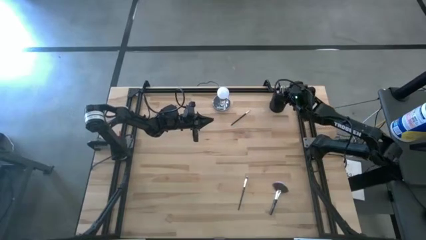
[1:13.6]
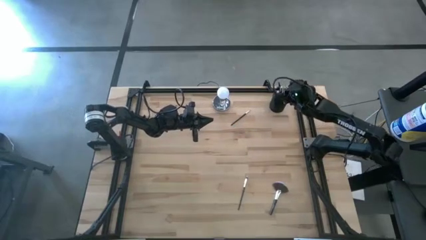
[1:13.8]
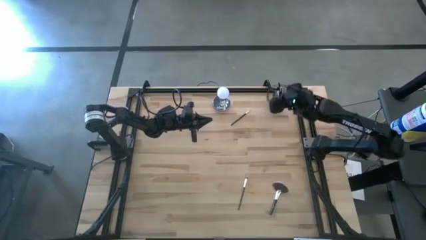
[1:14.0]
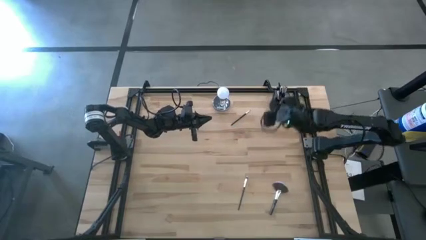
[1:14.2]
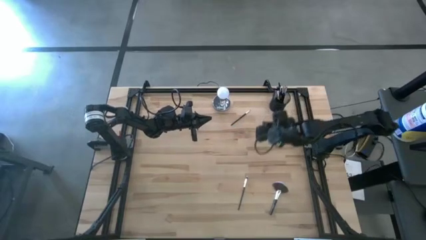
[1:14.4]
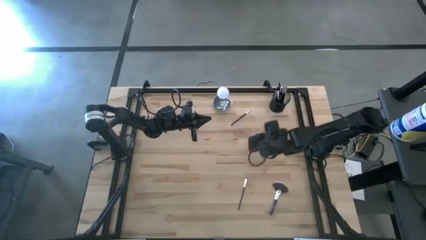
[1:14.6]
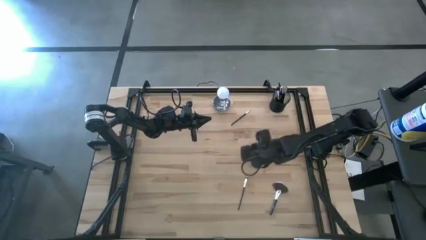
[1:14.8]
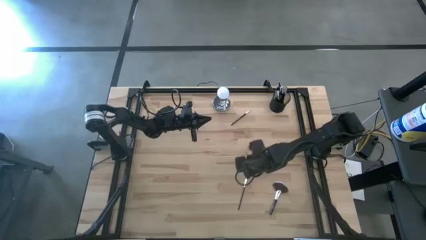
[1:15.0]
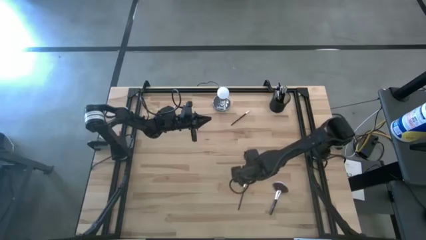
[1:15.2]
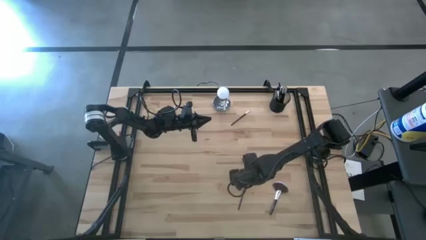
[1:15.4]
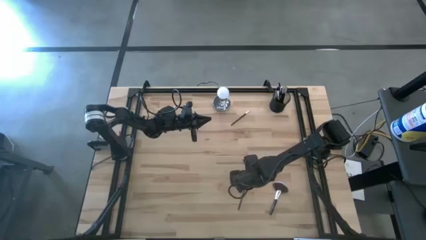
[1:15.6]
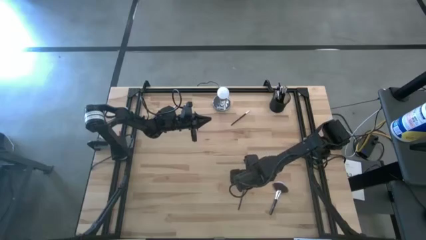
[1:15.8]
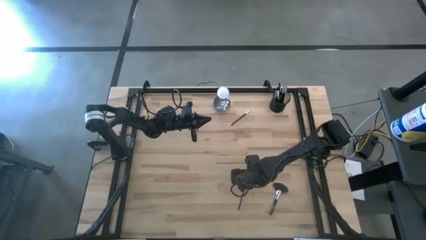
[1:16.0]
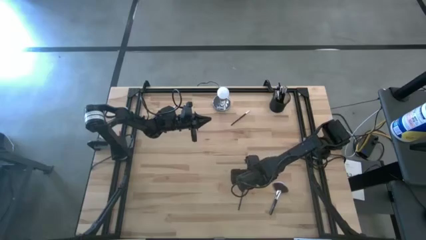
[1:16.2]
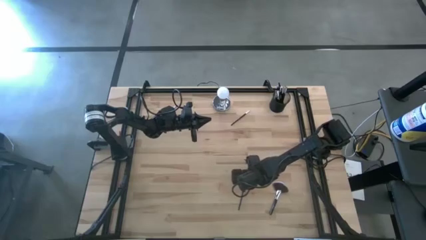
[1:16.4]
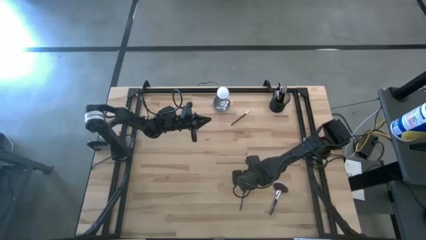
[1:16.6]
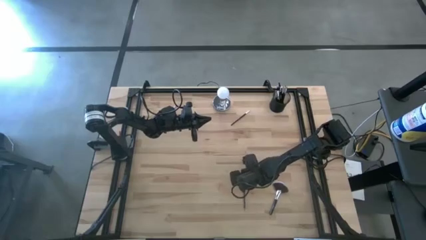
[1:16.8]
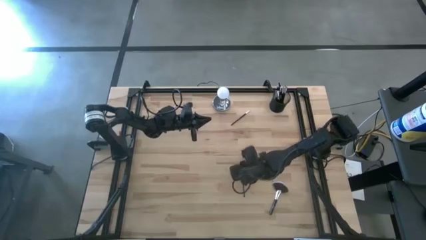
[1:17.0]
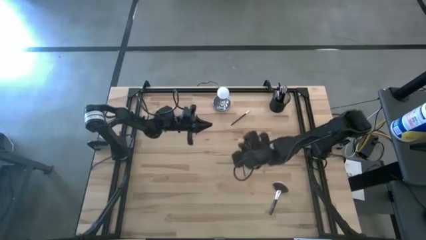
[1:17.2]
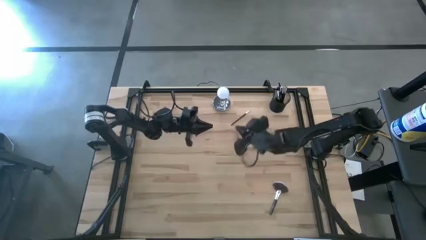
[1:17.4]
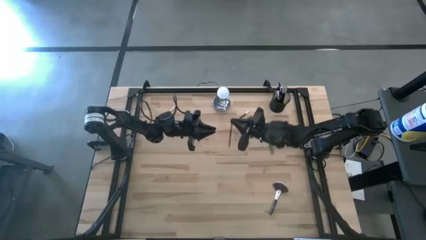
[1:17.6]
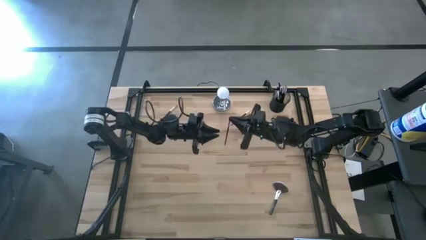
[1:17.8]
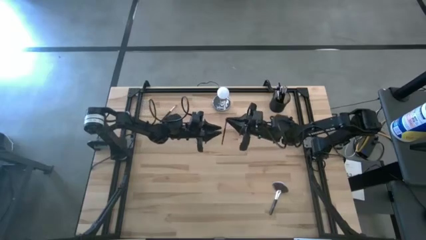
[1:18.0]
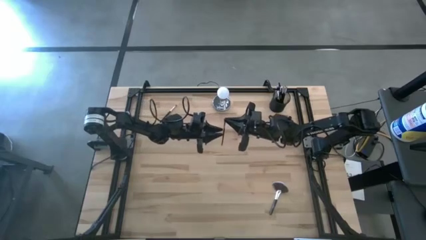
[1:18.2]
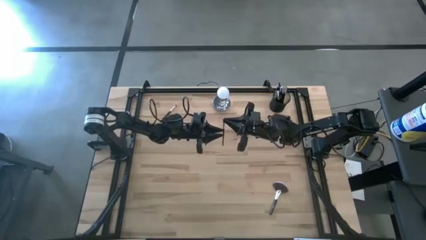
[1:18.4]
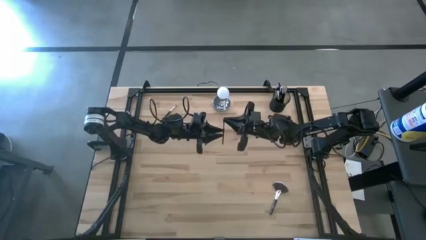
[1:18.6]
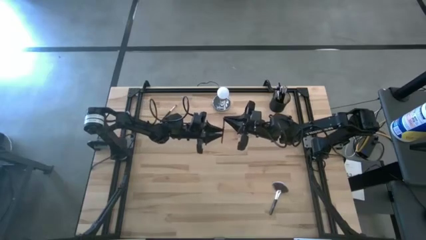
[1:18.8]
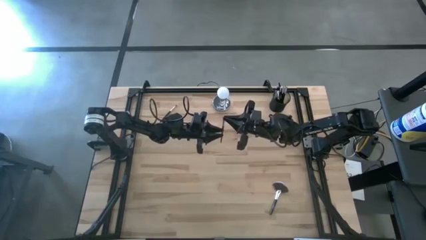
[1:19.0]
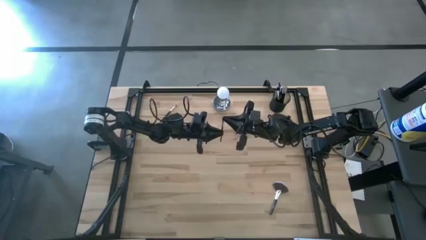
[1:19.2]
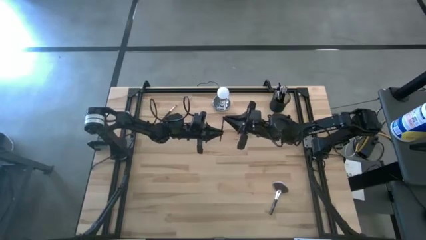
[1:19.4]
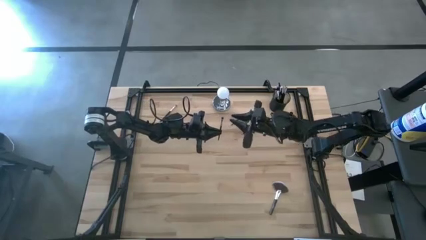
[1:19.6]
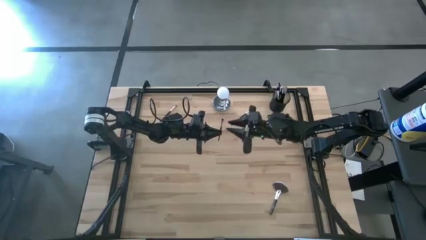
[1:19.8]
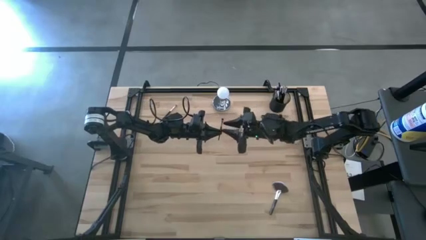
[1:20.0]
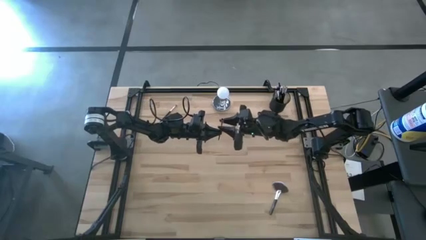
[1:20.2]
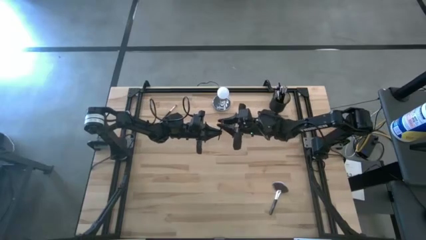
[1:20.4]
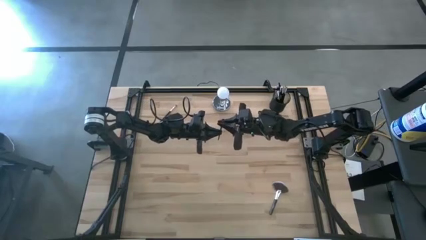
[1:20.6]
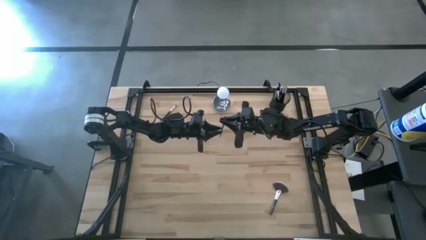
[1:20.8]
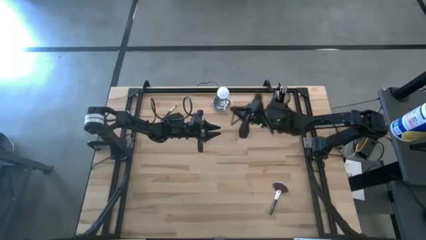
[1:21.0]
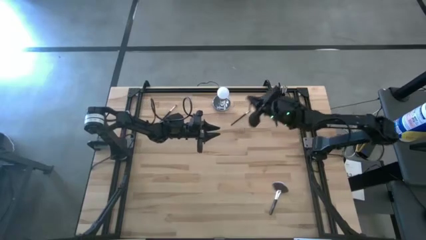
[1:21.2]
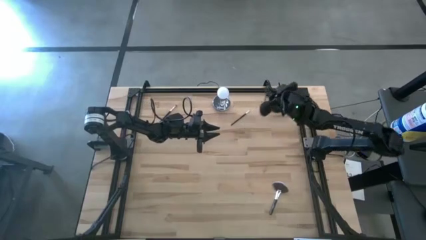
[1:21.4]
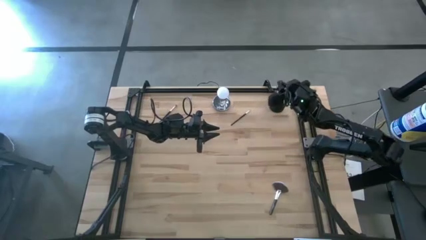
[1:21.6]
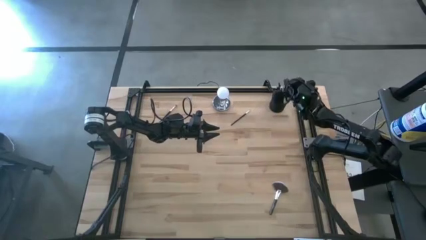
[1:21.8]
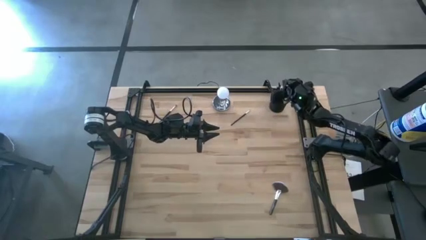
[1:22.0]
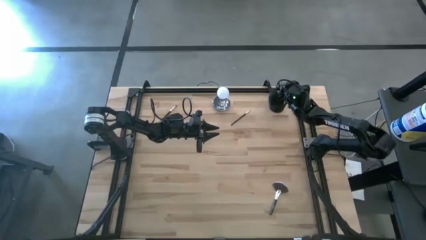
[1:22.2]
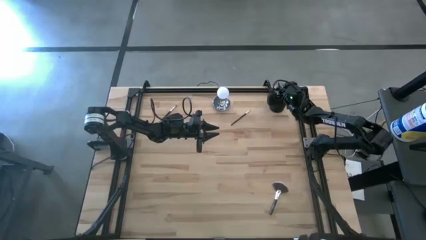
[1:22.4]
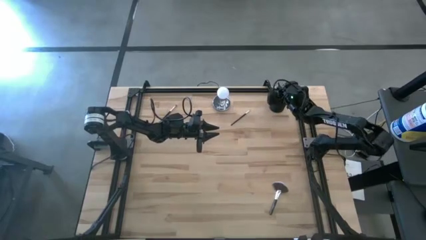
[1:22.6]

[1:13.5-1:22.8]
Task: Put items in baskets/containers
Put the black eyeshadow brush into the black pen holder

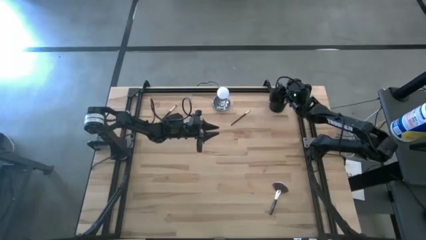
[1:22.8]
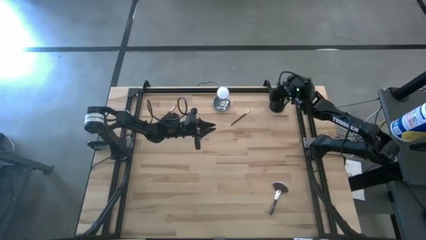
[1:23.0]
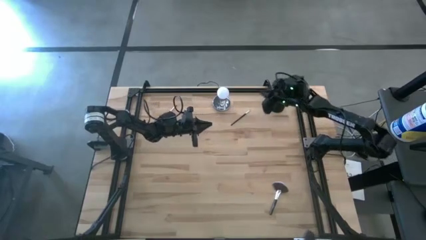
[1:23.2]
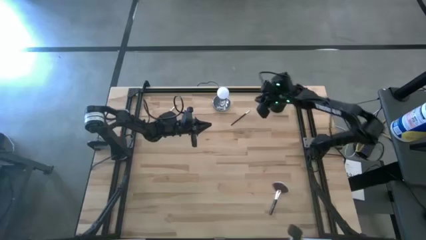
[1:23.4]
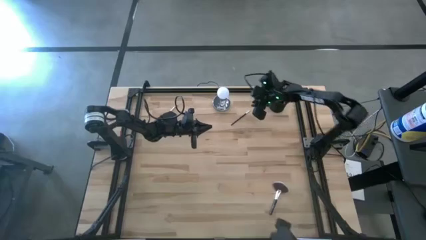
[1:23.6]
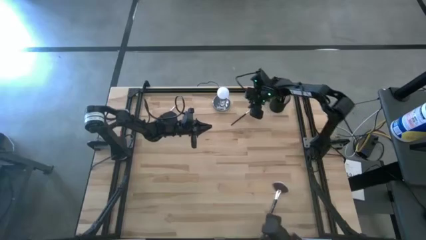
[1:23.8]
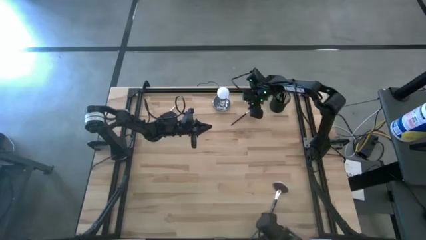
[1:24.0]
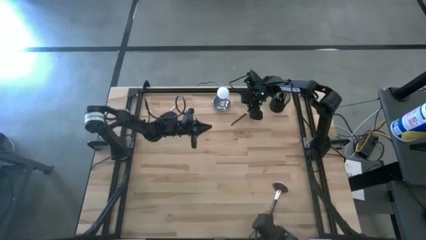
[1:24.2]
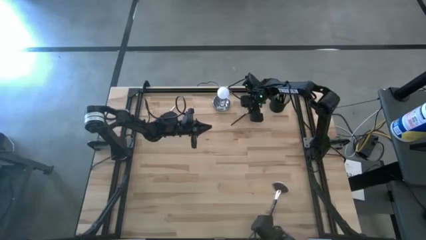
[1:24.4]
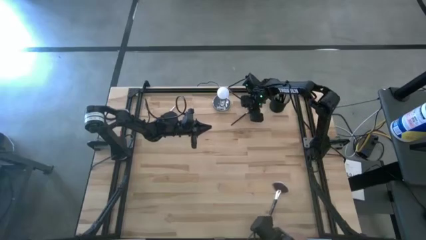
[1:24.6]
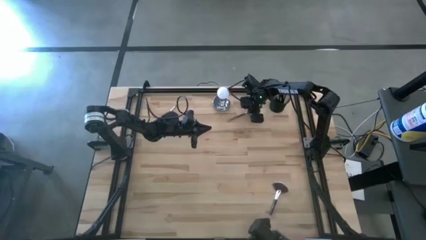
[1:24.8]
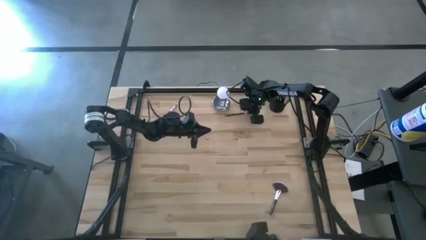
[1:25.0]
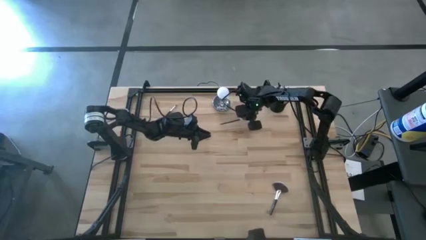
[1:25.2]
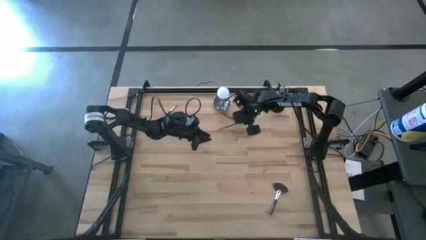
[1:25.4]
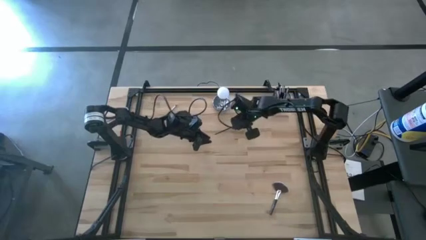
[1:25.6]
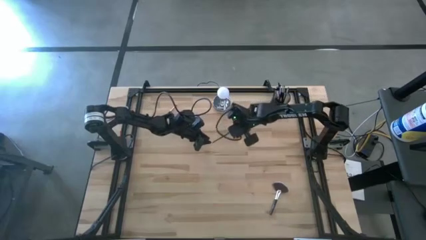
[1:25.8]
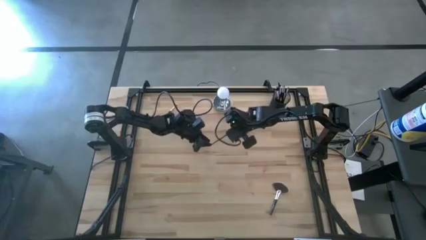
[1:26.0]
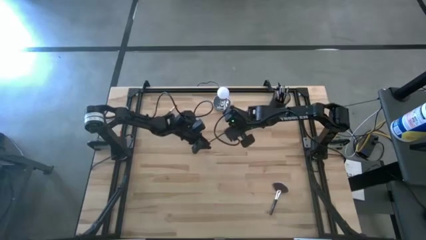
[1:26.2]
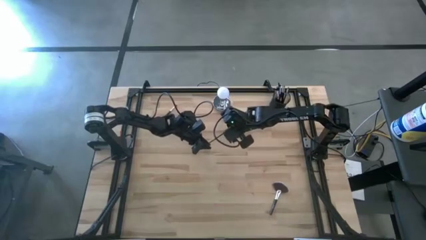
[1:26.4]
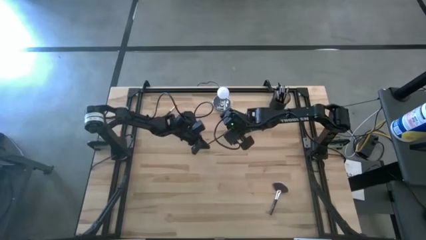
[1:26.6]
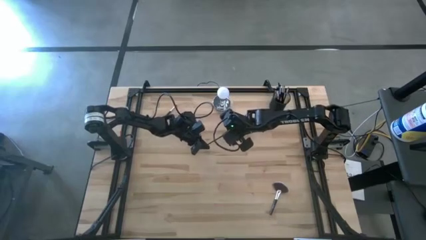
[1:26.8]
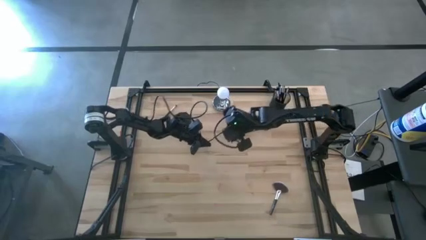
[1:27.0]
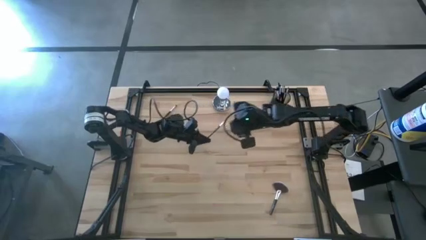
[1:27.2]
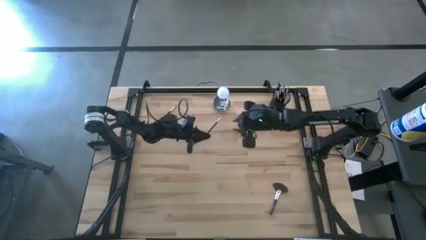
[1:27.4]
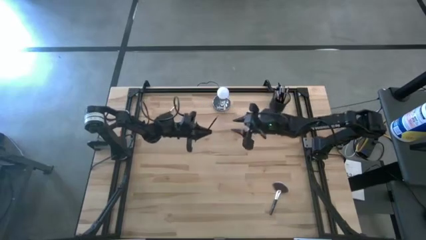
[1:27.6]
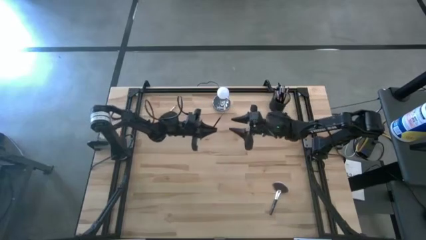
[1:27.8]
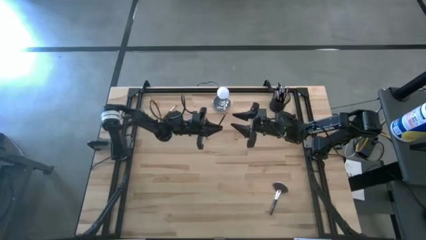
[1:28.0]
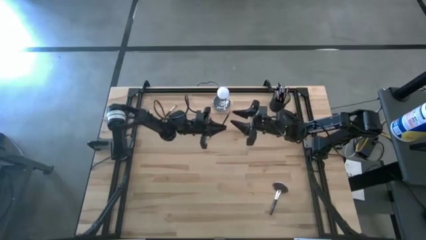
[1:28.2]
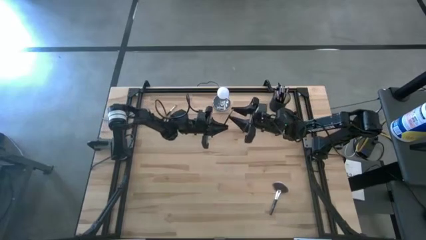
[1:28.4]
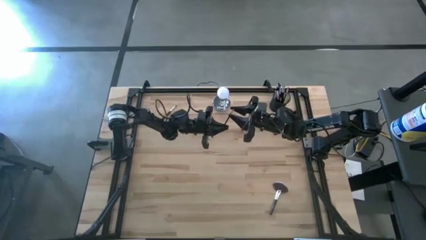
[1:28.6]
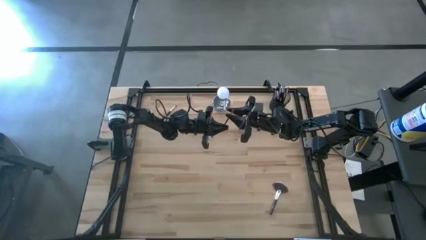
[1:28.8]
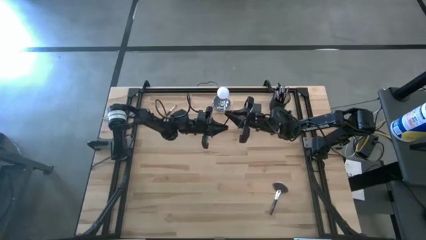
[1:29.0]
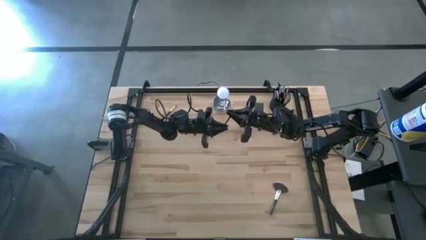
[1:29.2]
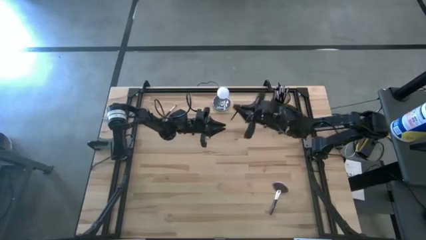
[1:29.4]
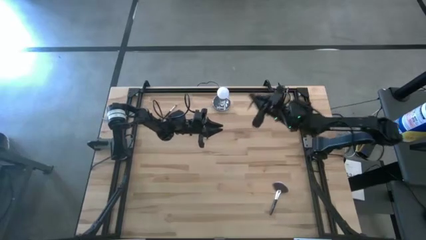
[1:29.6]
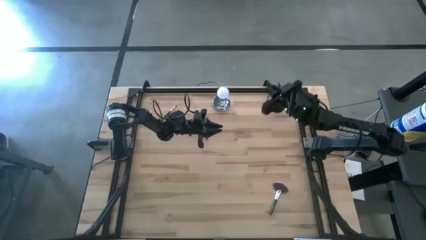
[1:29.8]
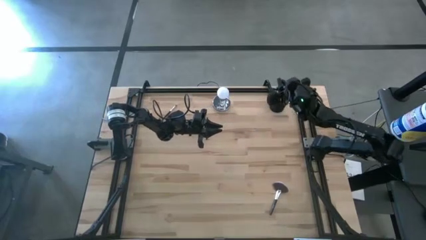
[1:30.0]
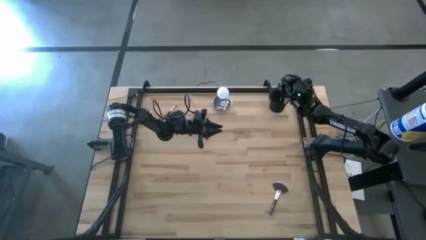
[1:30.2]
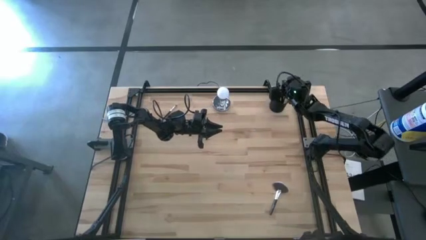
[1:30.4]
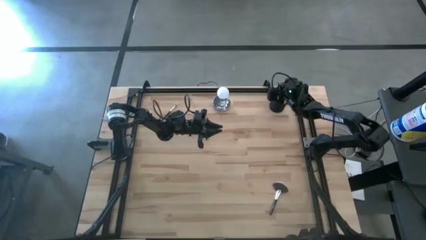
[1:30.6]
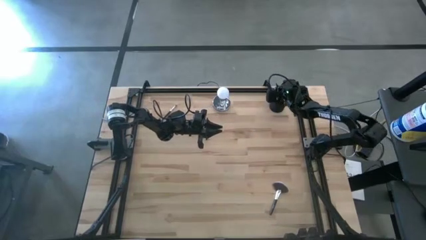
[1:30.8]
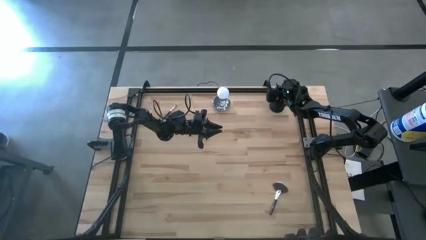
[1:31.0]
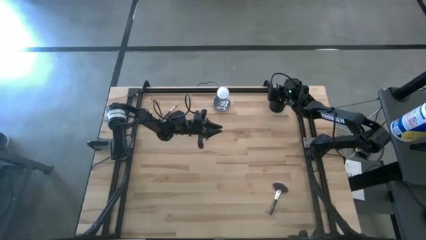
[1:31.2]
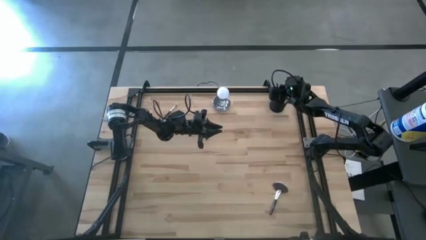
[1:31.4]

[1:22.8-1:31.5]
Put the black liner brush into the black pen holder
